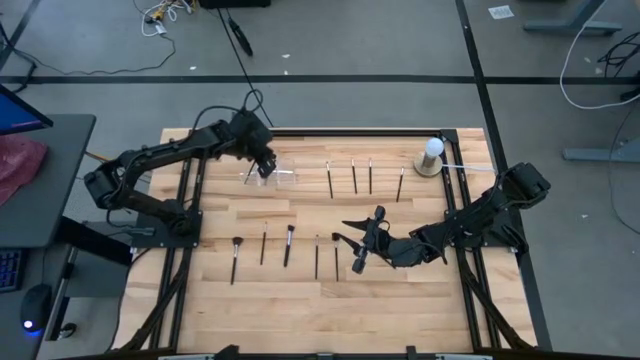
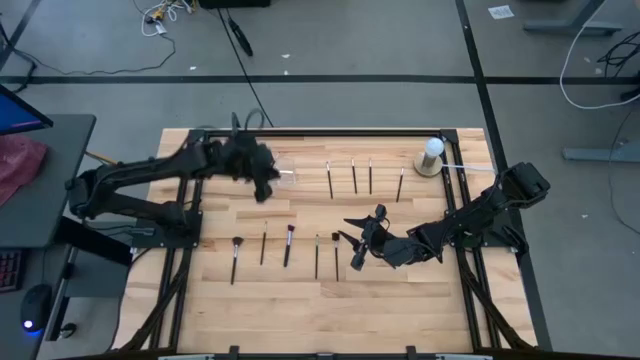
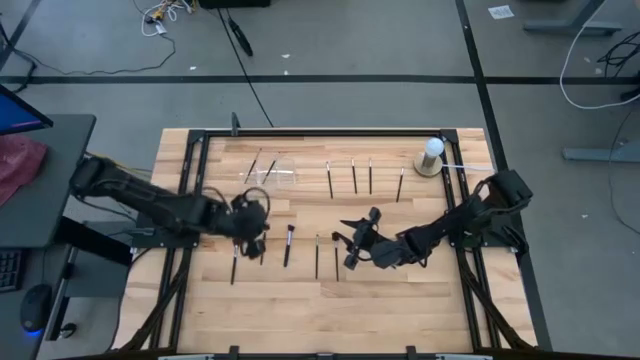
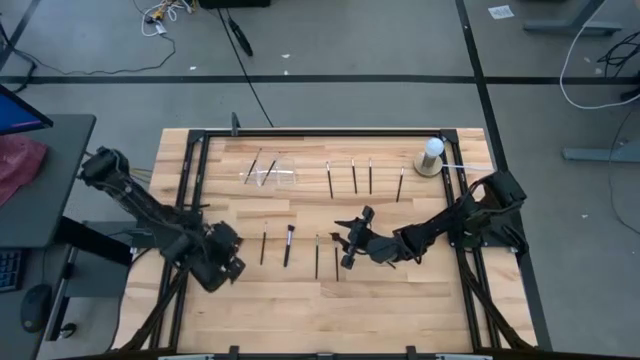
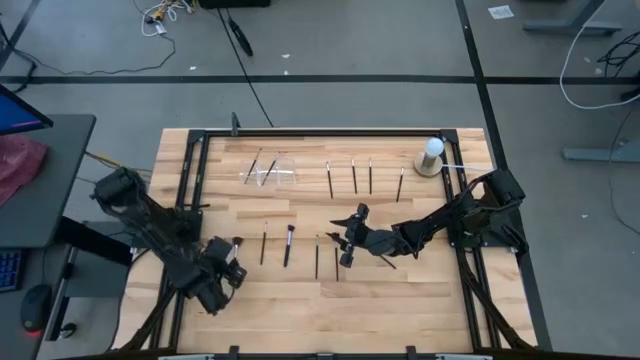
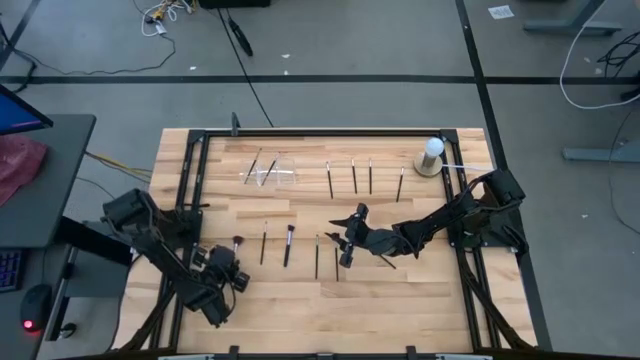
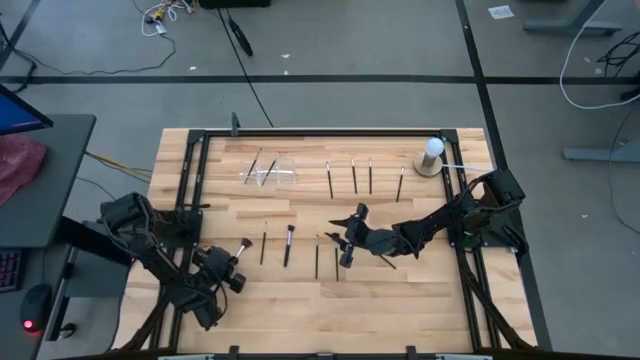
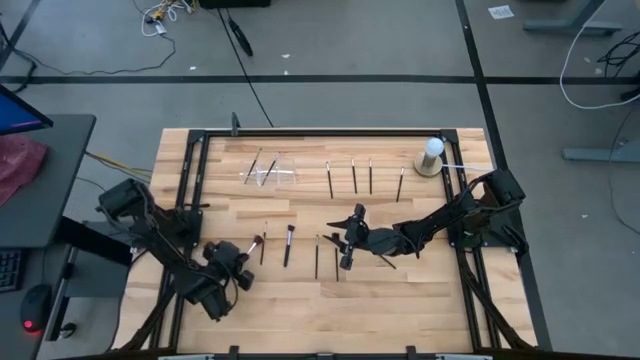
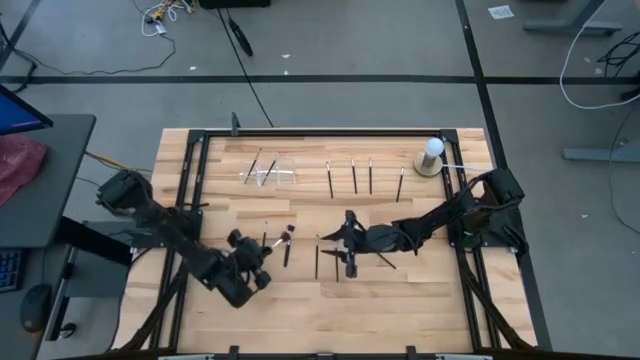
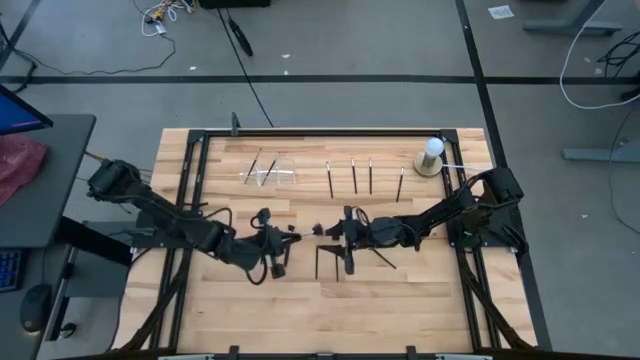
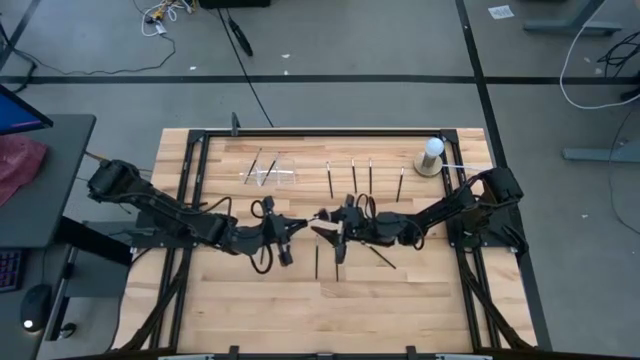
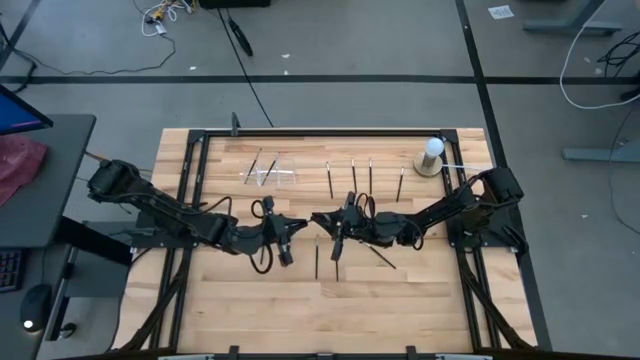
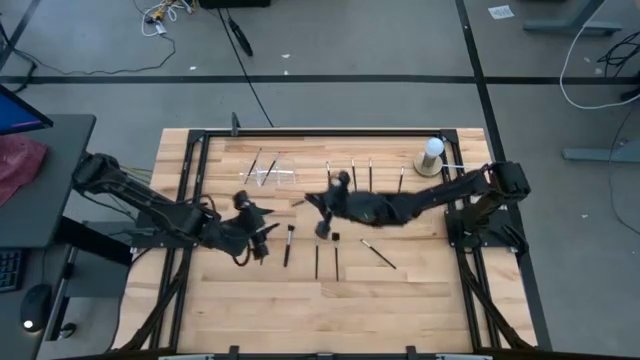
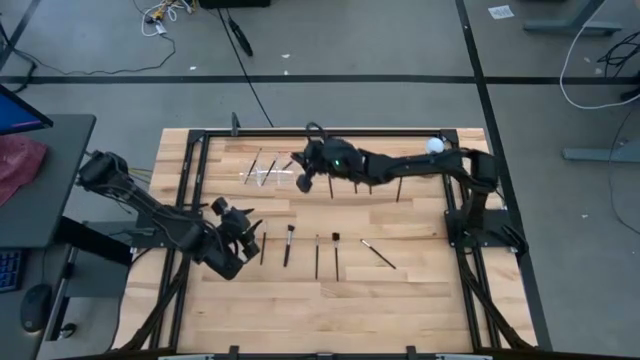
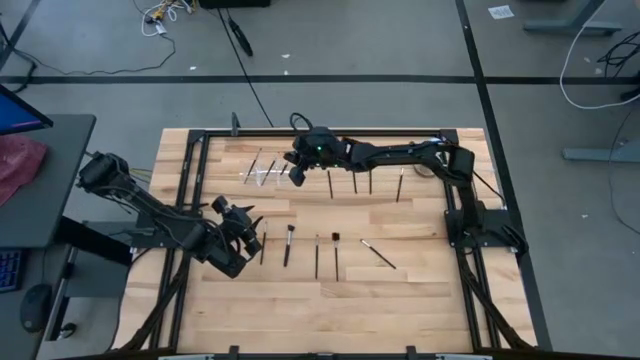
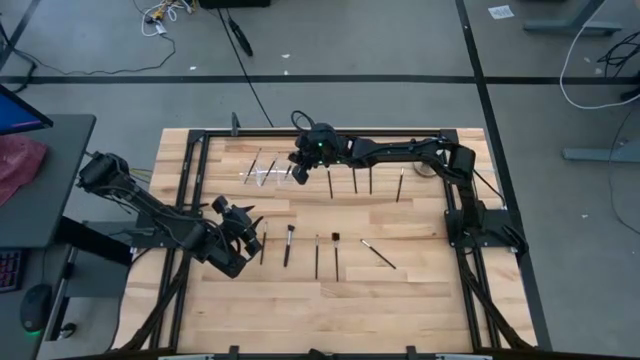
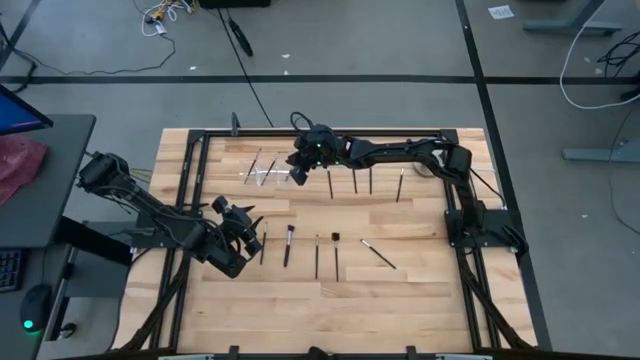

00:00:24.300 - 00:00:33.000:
Task: Put items in baskets/containers
Put the highlighter brush into the transparent organizer

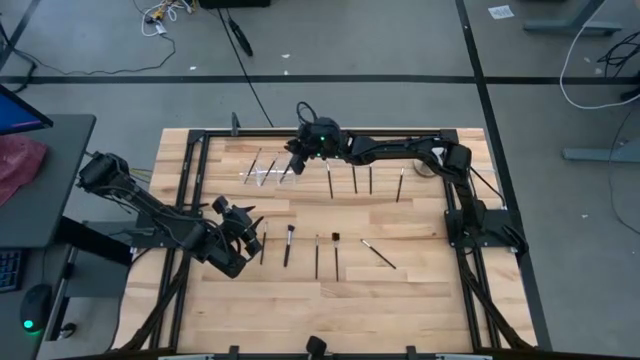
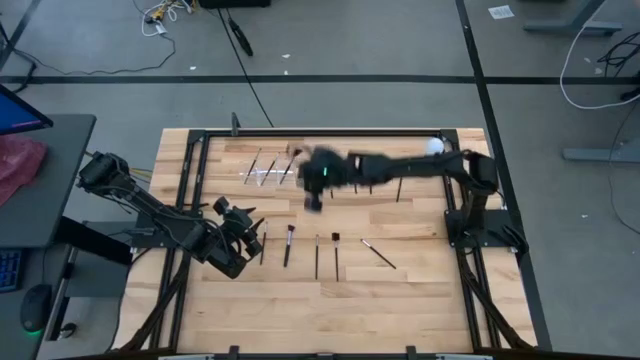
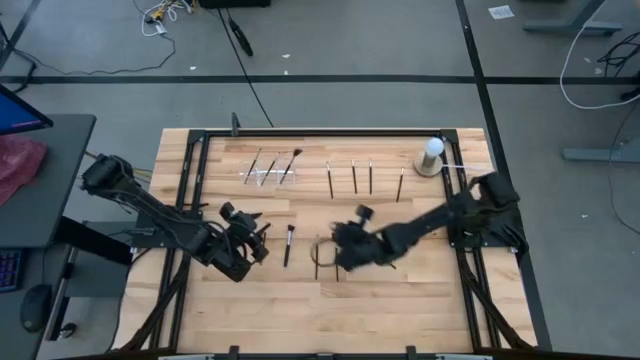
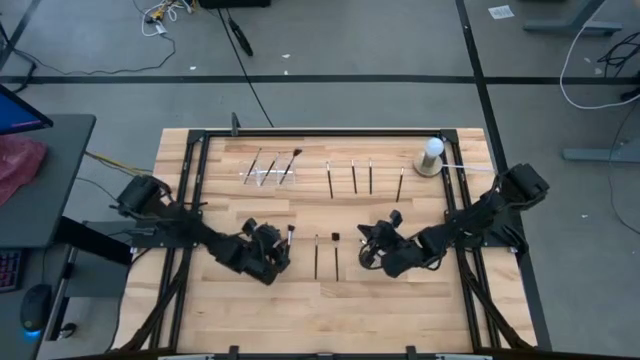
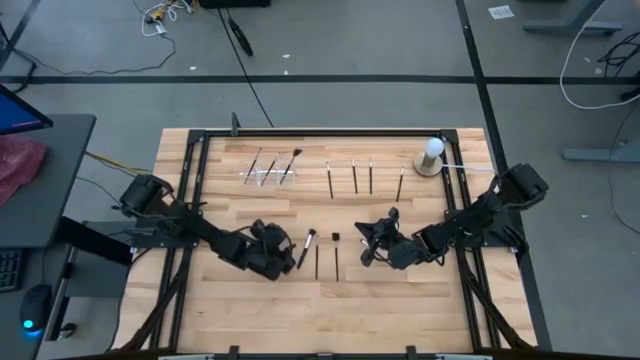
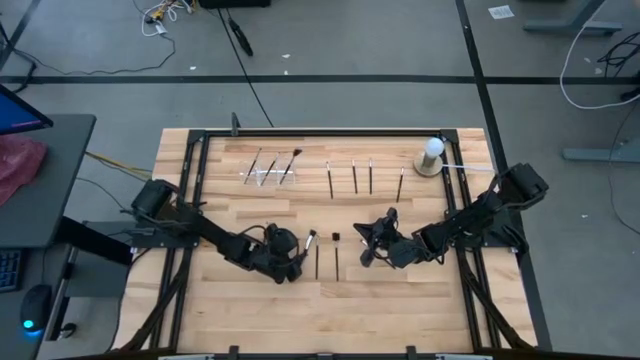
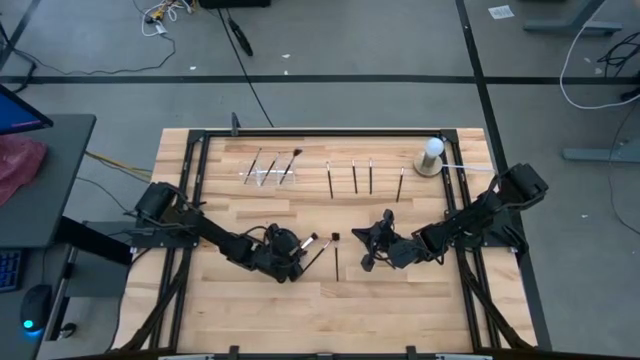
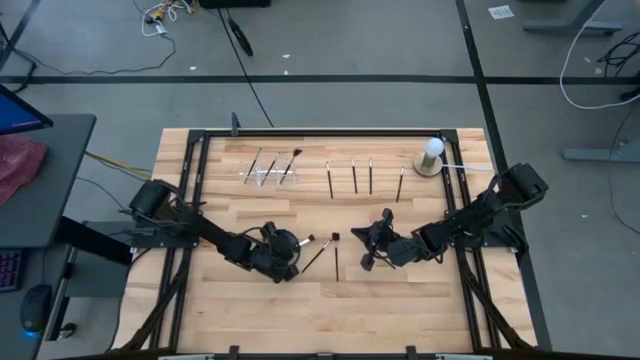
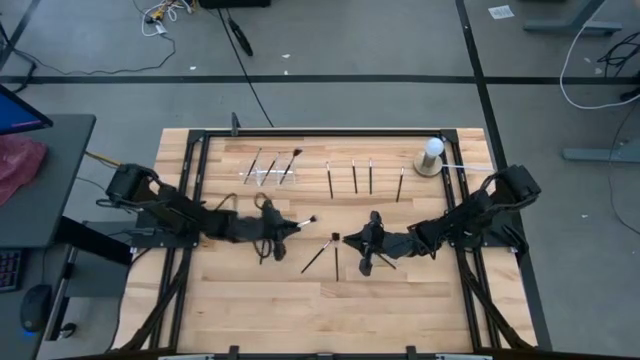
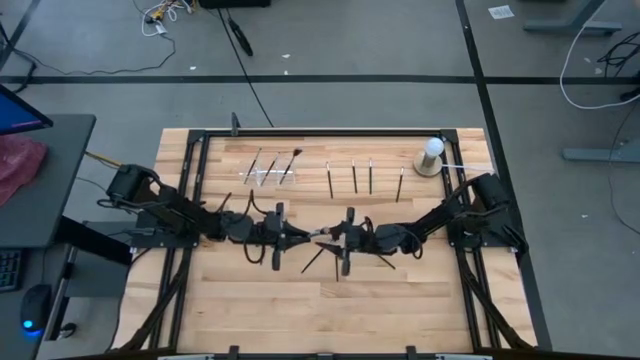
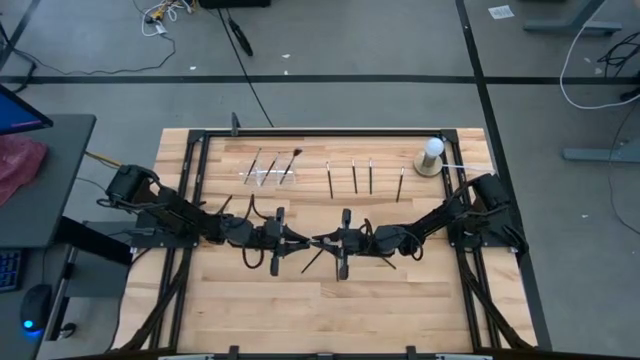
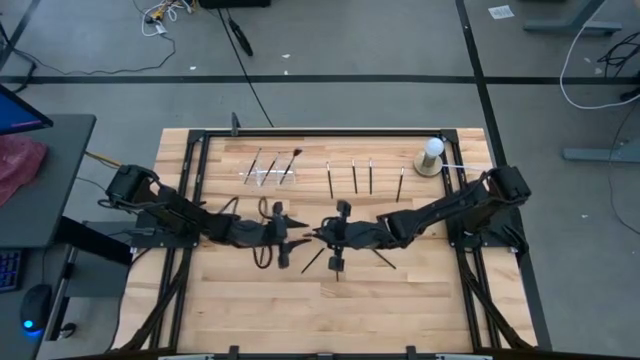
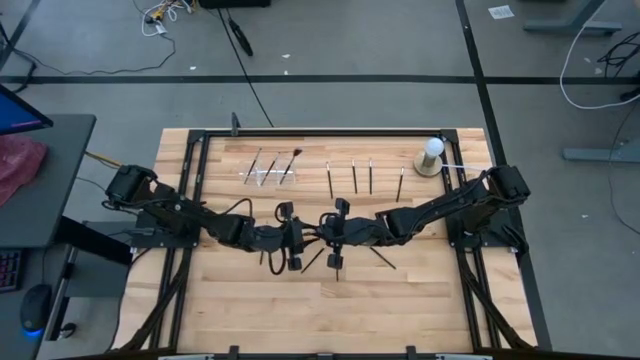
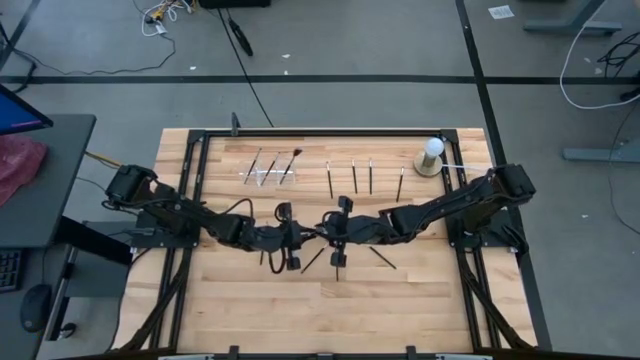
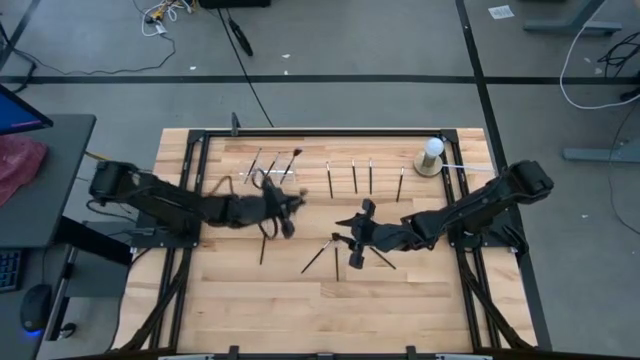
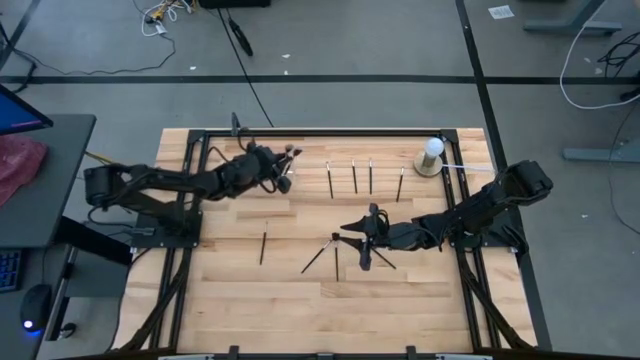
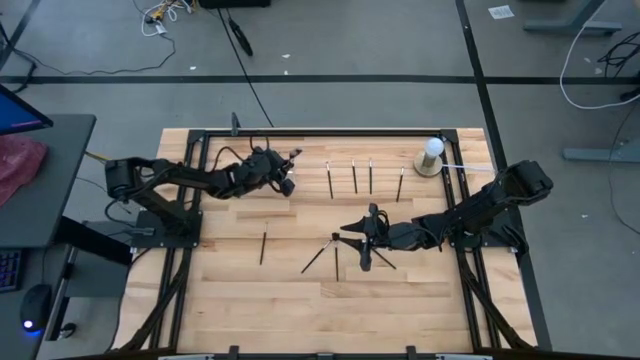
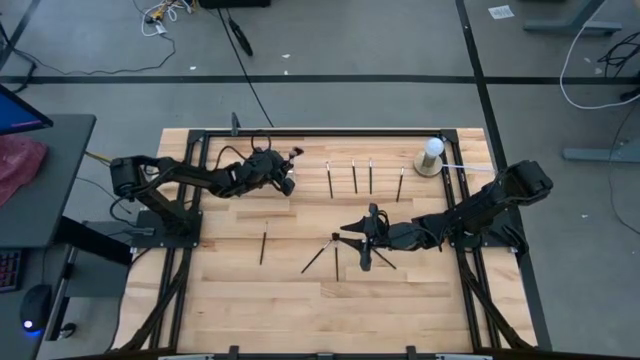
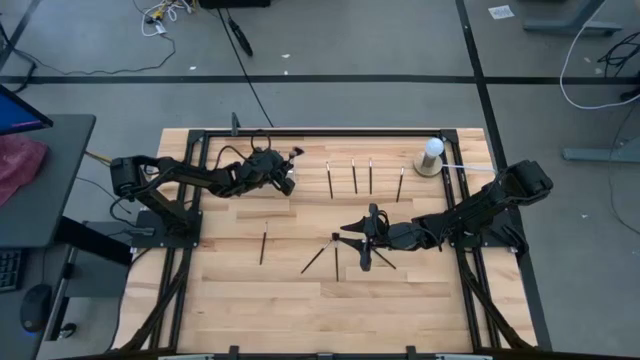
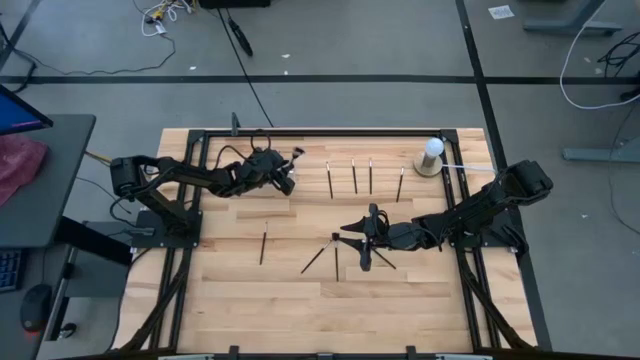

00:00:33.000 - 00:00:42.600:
Put the powder brush into the transparent organizer

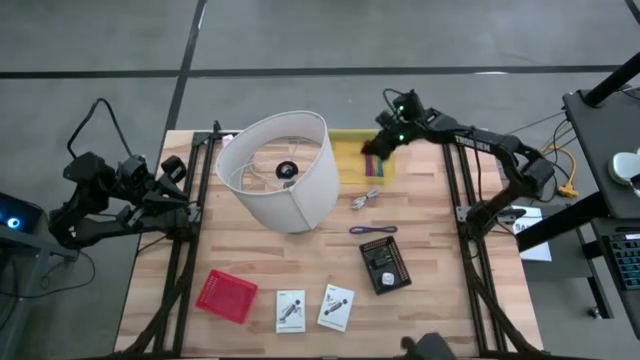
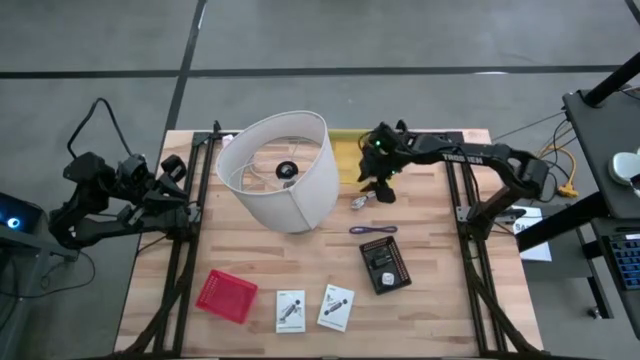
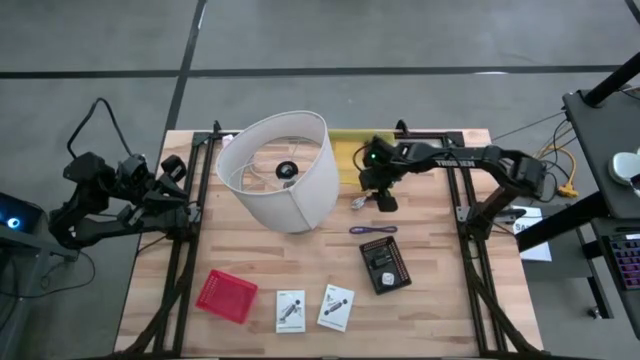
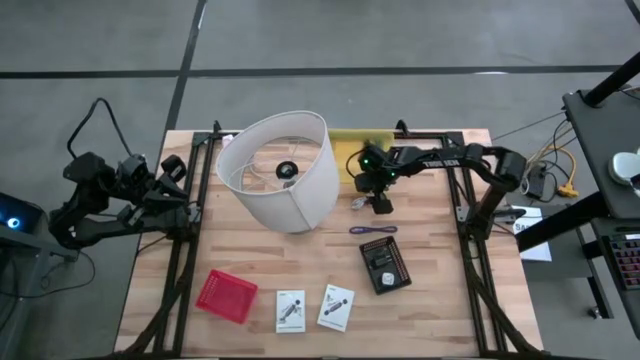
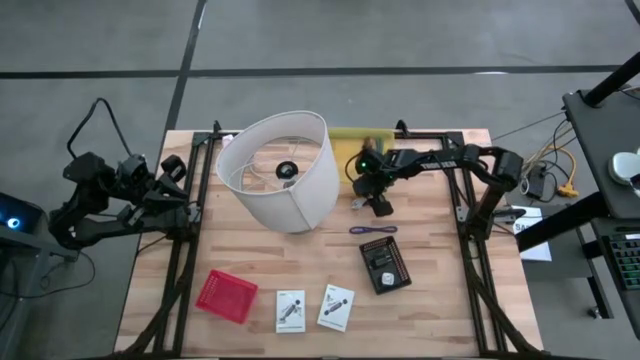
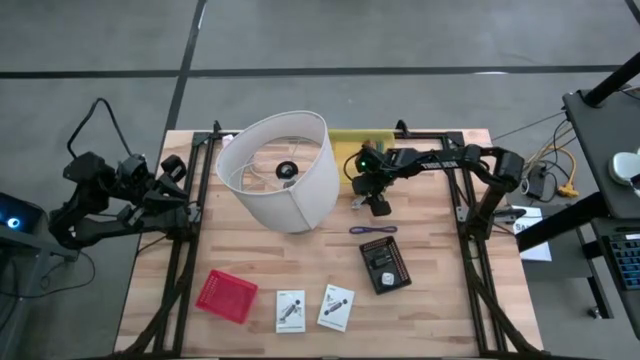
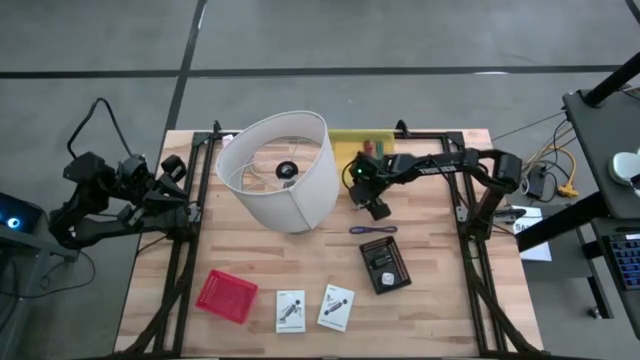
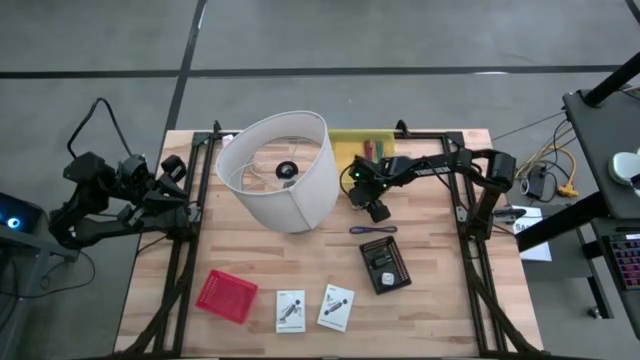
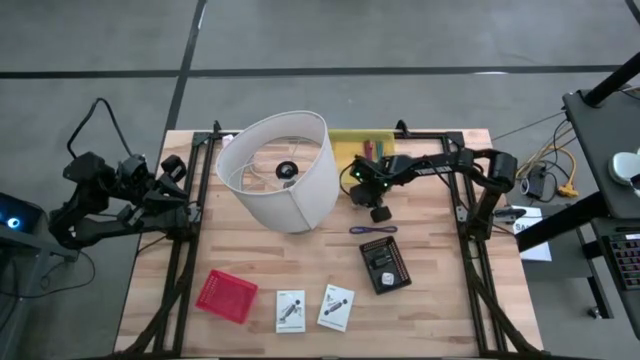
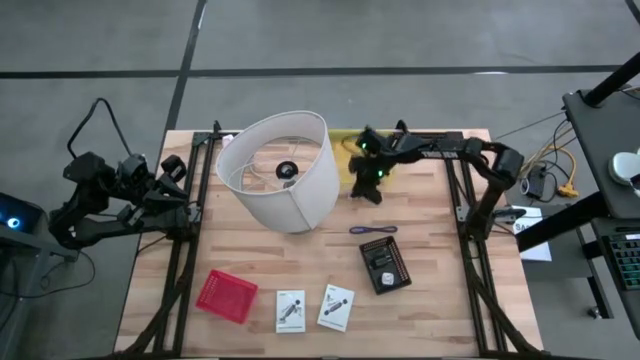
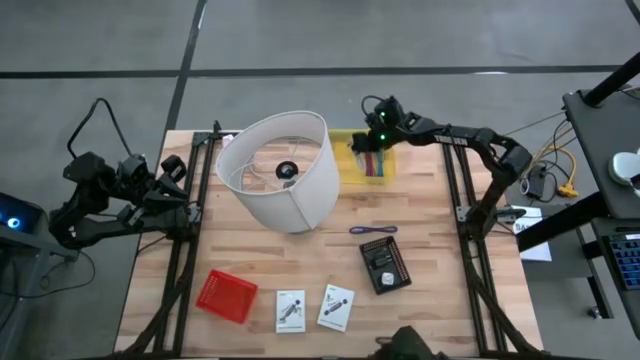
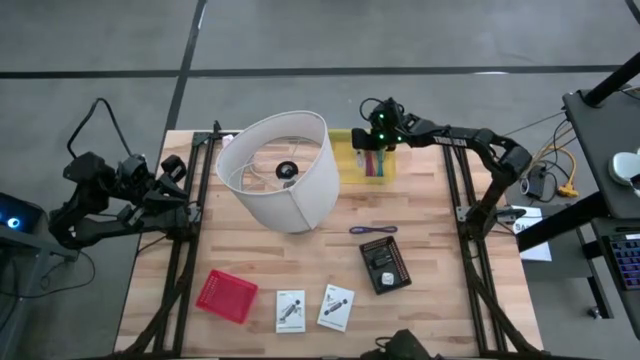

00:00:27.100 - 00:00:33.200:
Task: Pick and place items into bin
Put the white cable into the yellow bin
